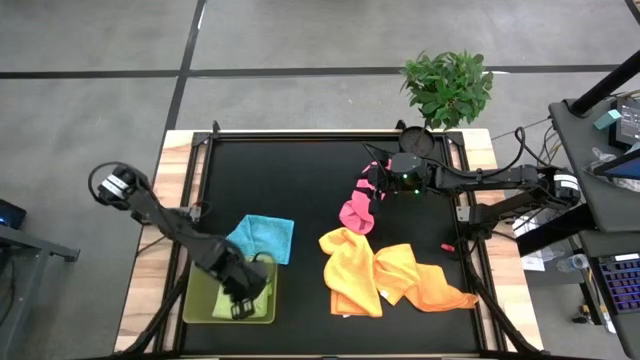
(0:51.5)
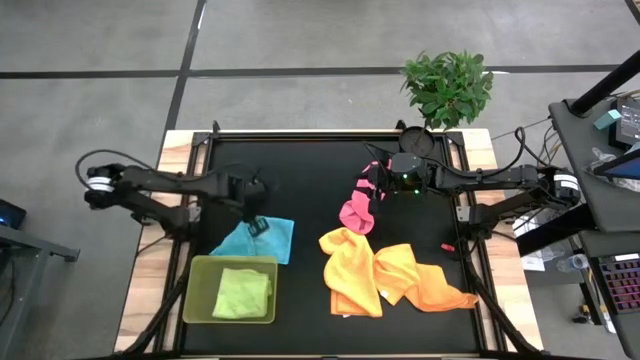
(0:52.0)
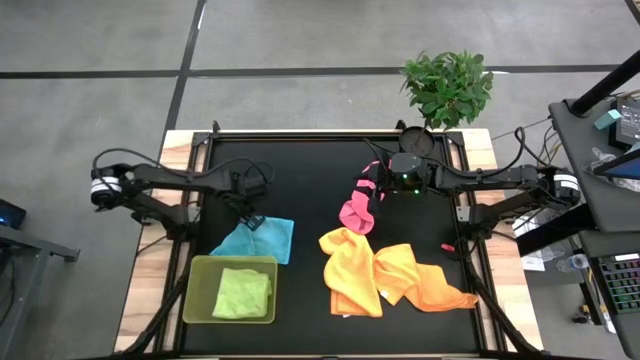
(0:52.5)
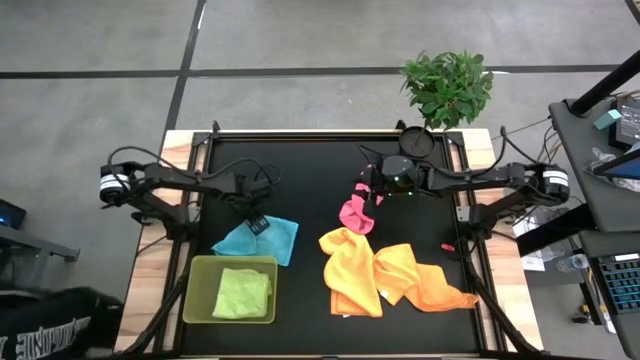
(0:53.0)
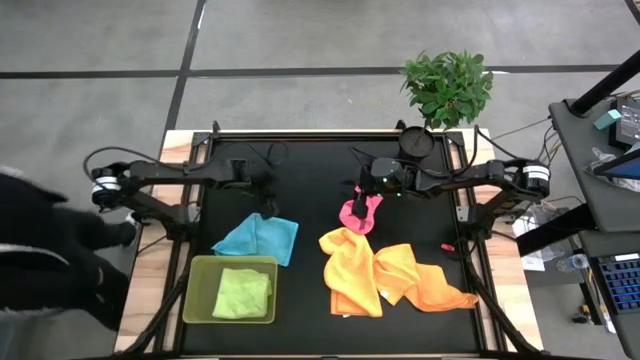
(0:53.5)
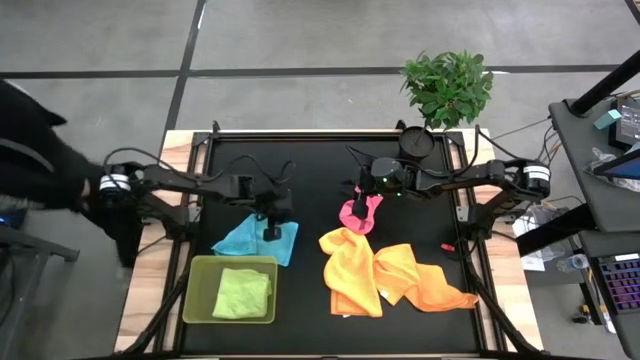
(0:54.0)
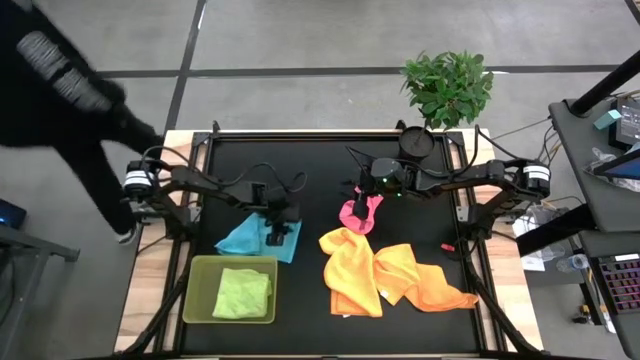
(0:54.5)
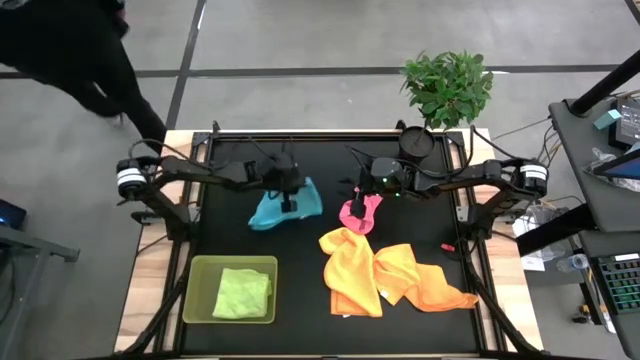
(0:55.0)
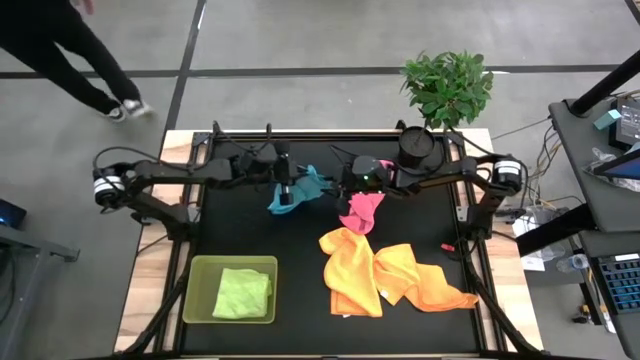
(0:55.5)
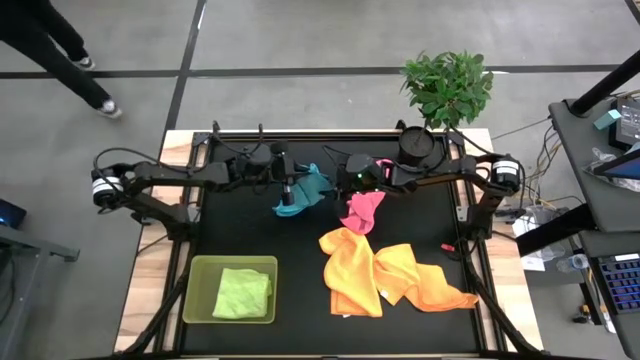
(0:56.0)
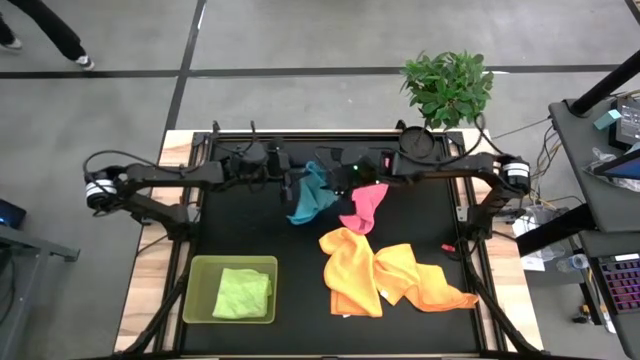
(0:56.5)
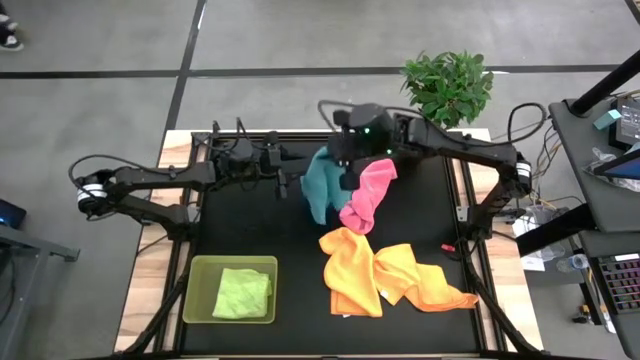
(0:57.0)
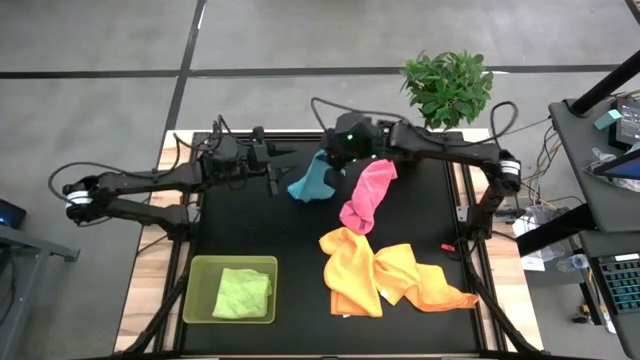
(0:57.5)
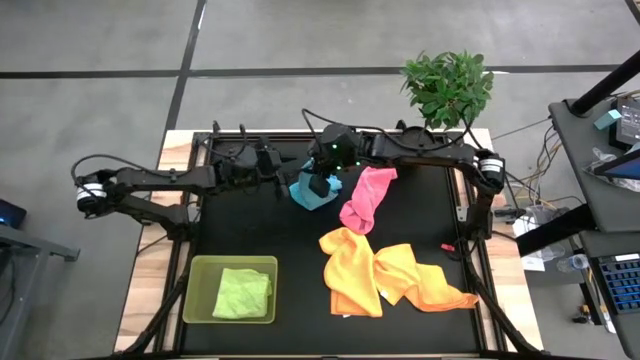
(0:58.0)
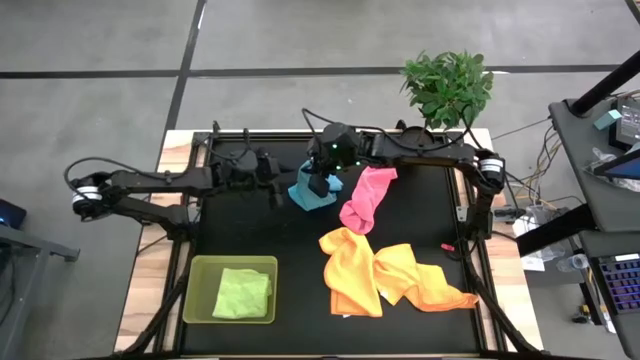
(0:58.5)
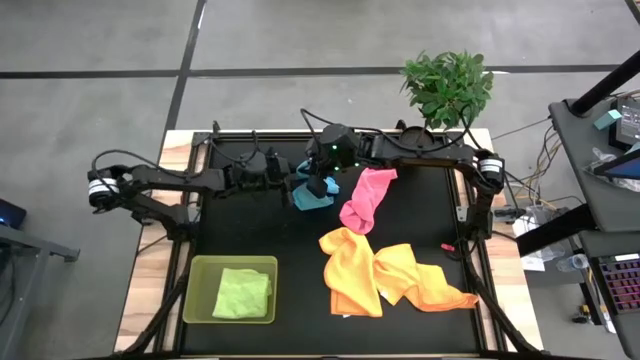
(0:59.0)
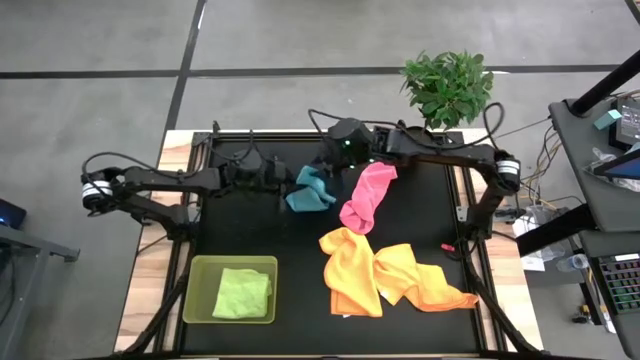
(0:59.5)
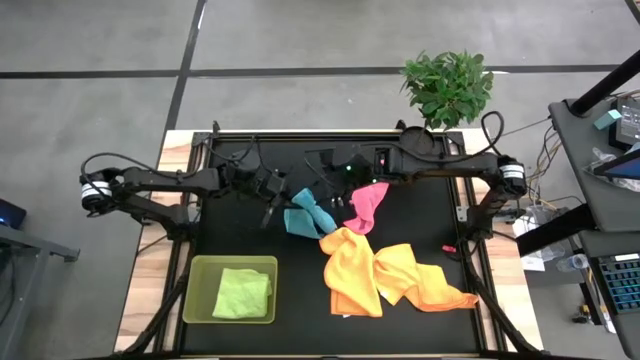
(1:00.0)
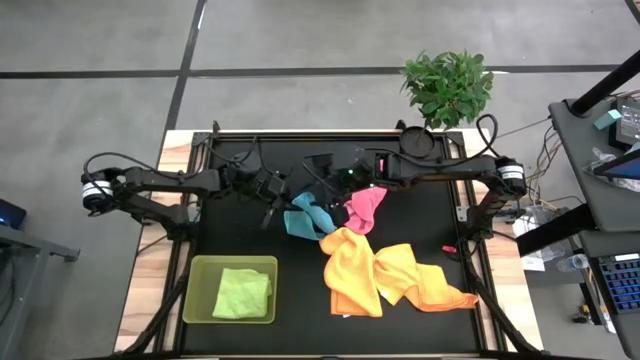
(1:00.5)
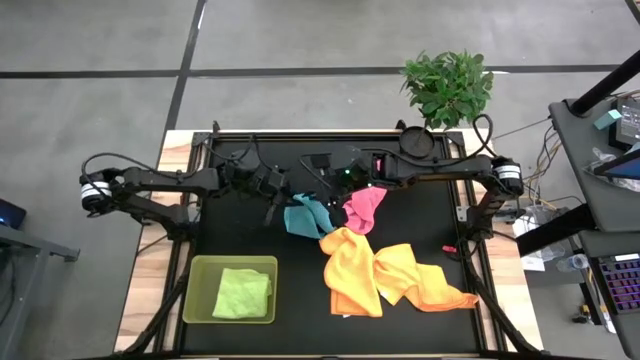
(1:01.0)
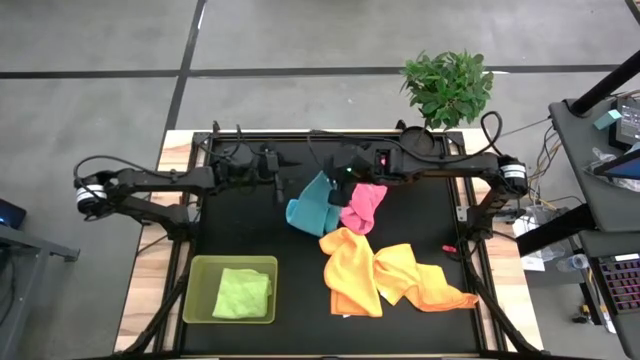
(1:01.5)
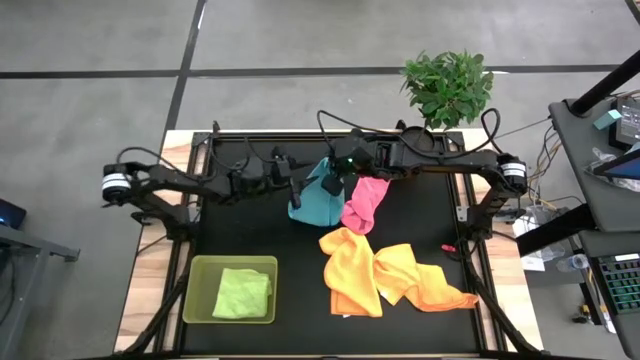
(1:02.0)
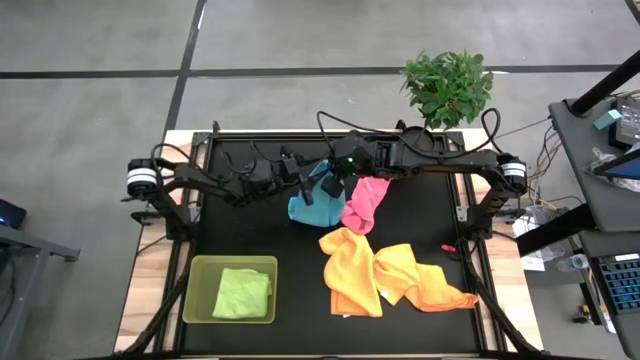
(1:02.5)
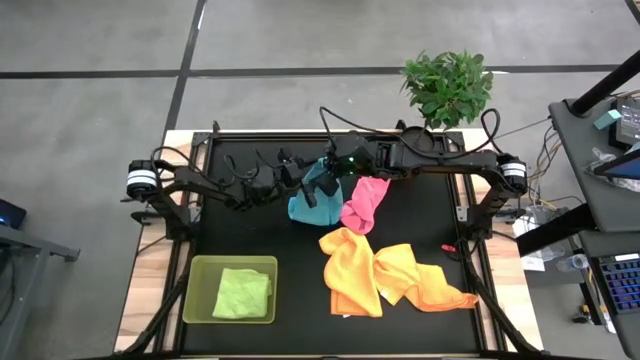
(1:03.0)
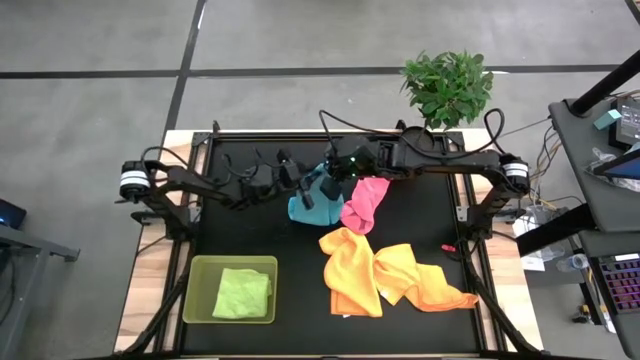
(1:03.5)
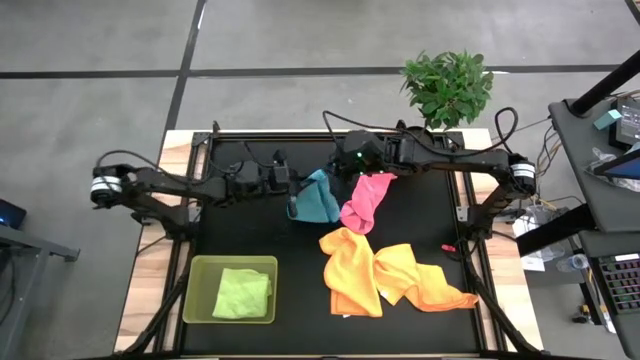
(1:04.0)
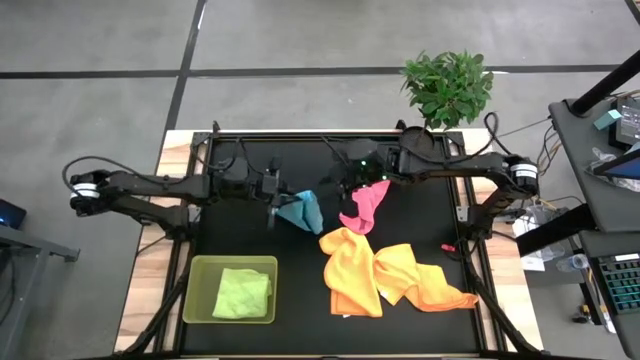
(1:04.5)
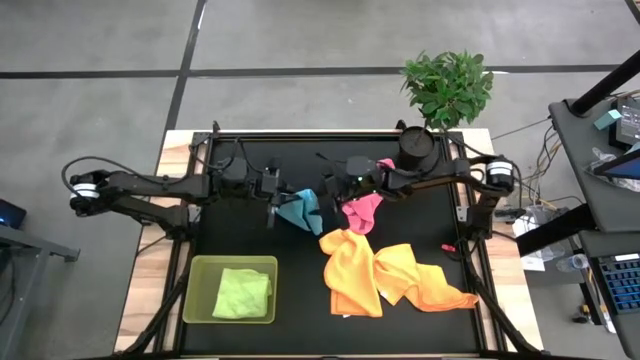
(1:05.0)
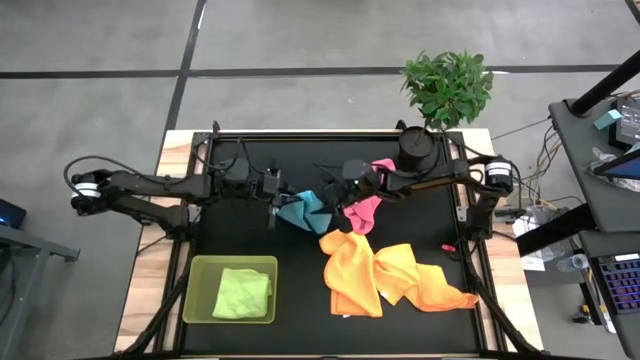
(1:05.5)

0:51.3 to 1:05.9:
Task: Fold microfiber towels
Fold the blue microfiber towel

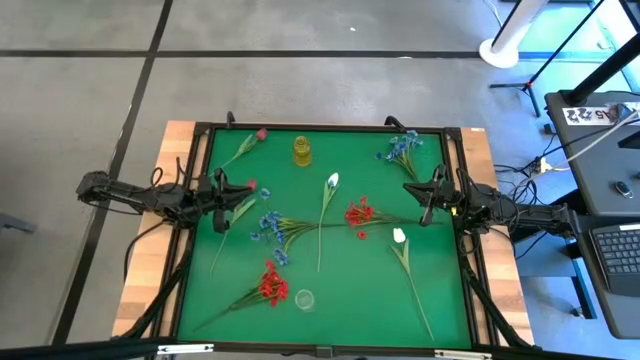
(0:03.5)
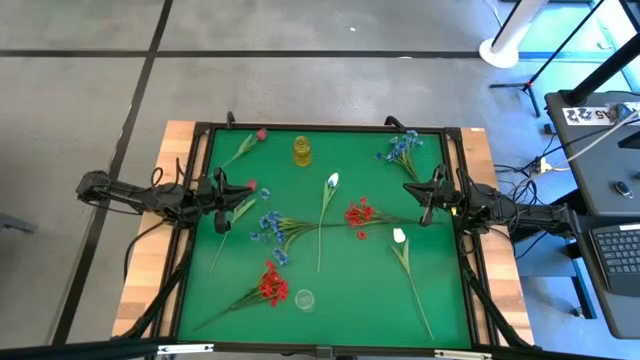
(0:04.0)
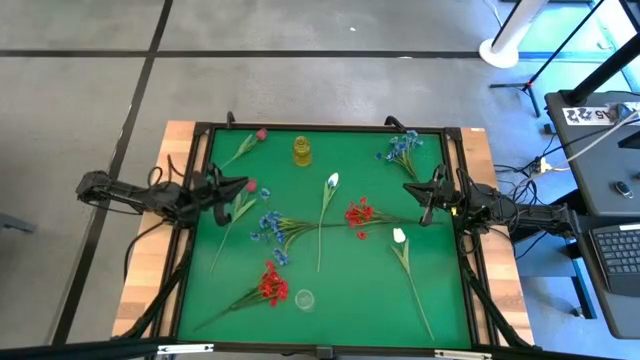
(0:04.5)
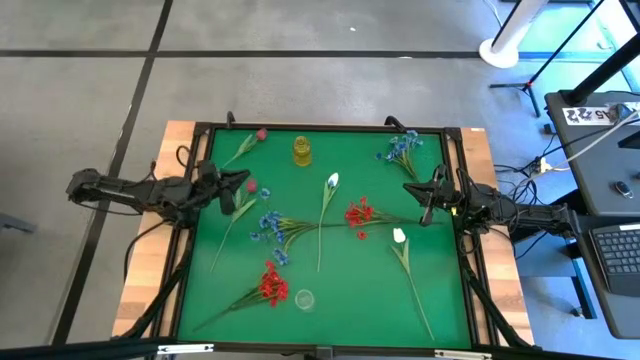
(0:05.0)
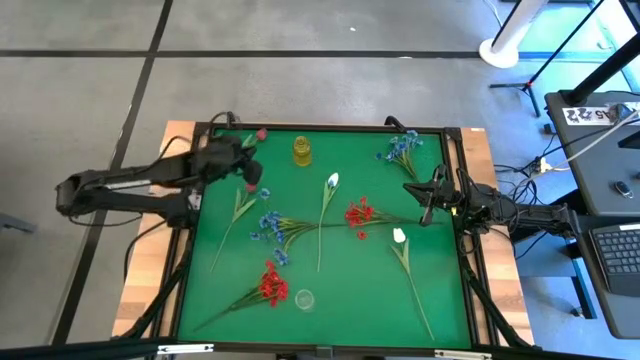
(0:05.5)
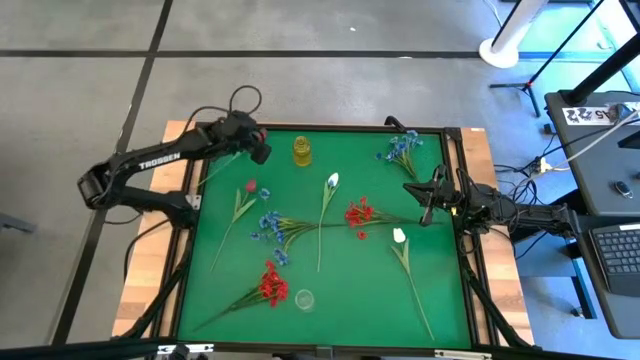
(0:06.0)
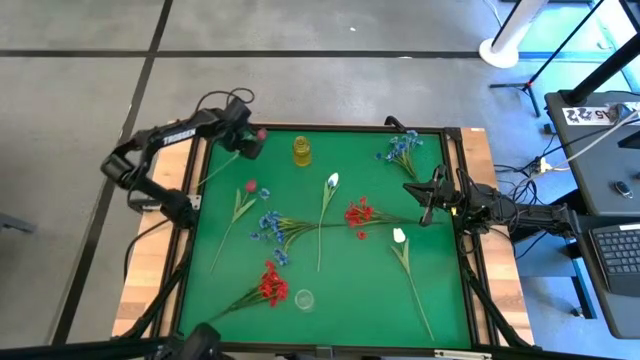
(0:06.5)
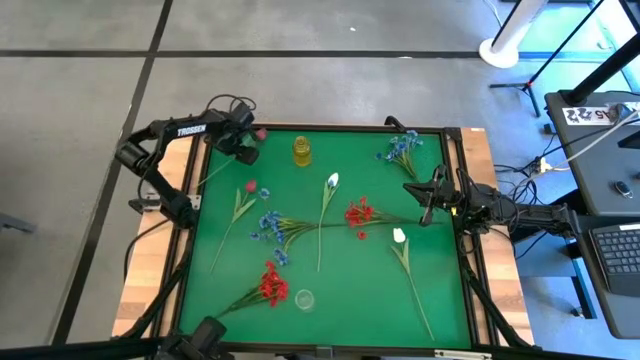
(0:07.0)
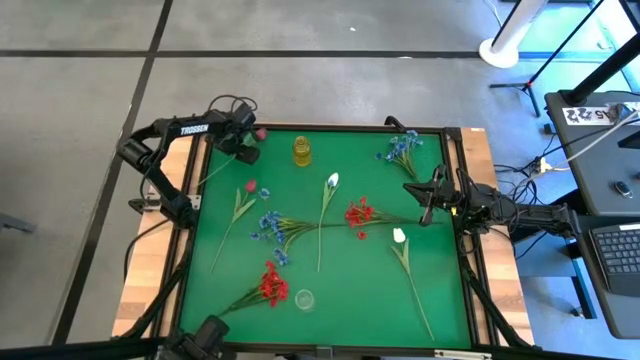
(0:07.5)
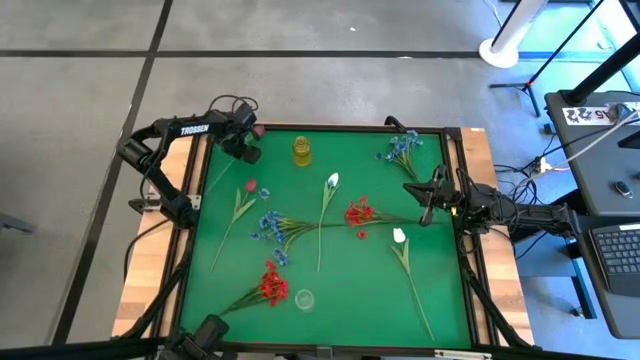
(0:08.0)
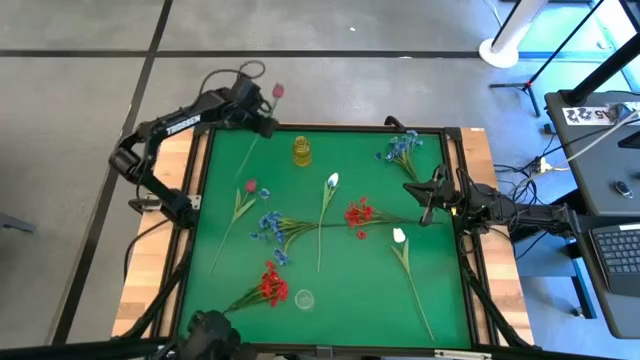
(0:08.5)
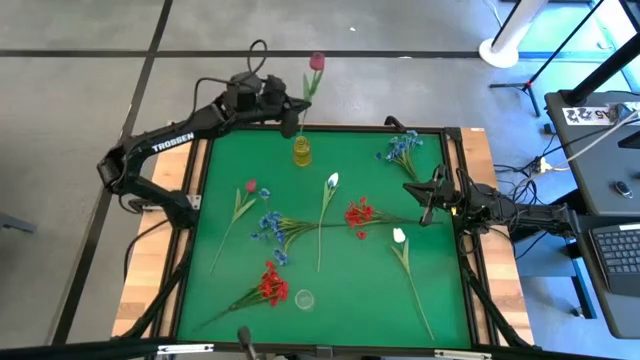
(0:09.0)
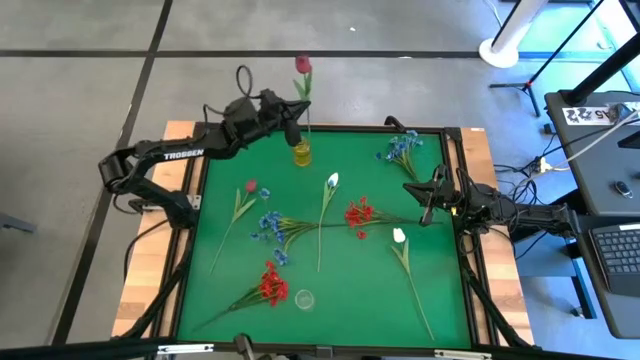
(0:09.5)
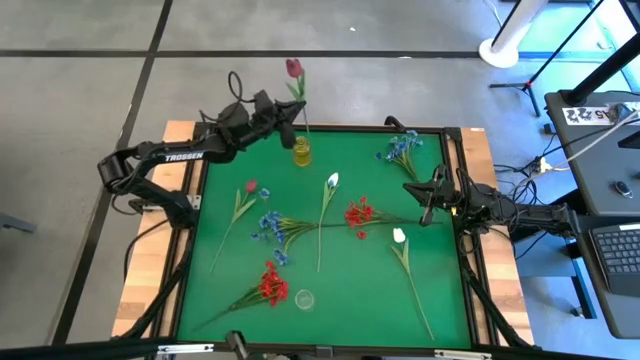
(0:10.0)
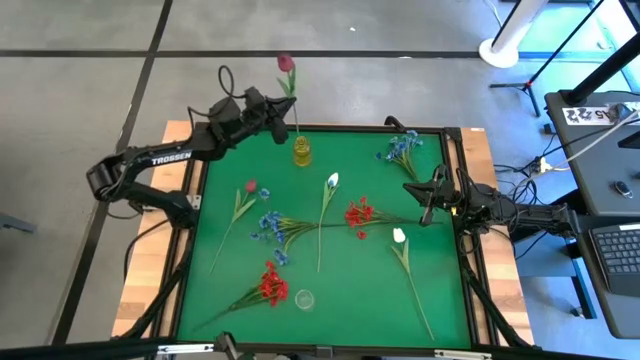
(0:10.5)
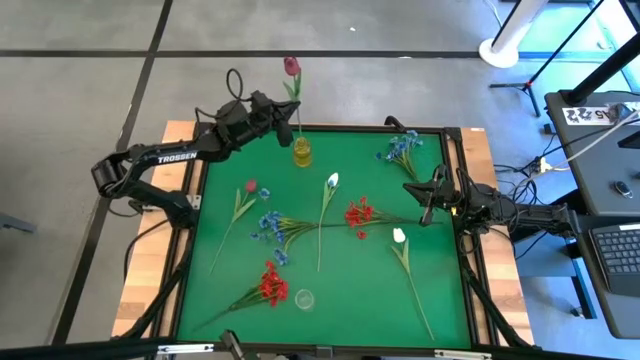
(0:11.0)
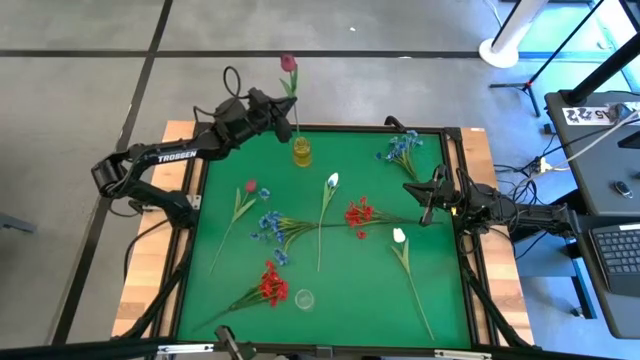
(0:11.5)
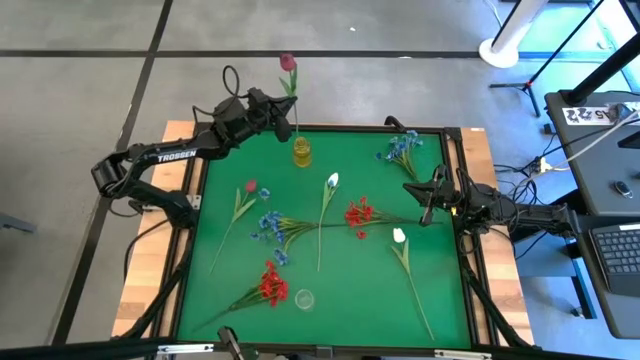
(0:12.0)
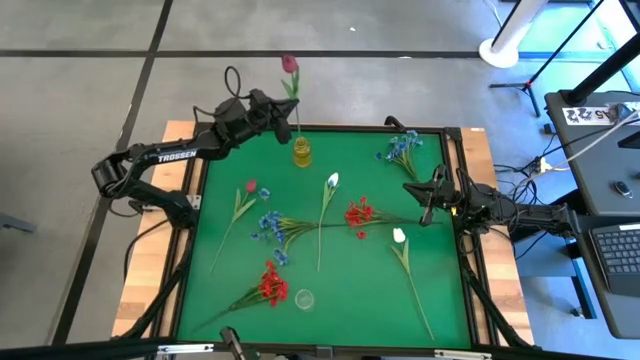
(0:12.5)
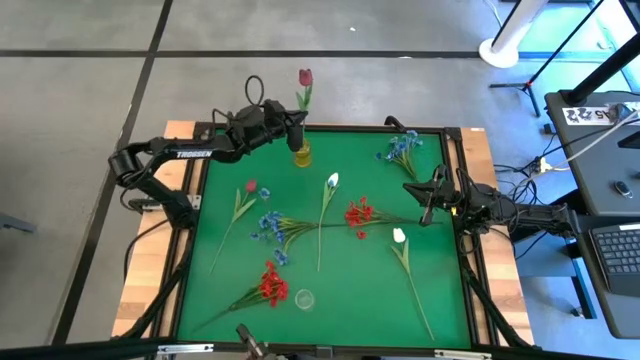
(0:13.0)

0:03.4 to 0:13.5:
Task: Sort flowers into vase by color
Put the top red tulip into the yellow vase
